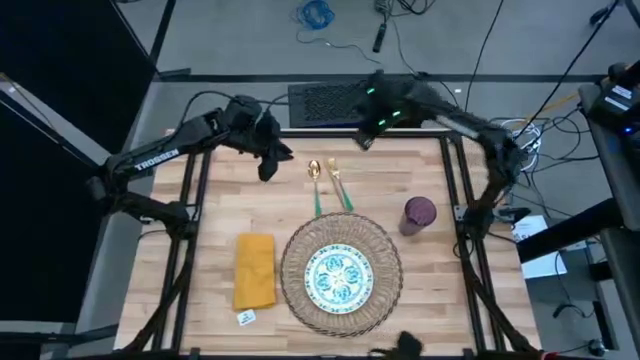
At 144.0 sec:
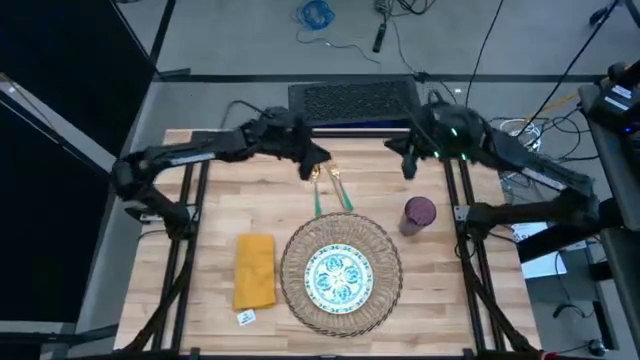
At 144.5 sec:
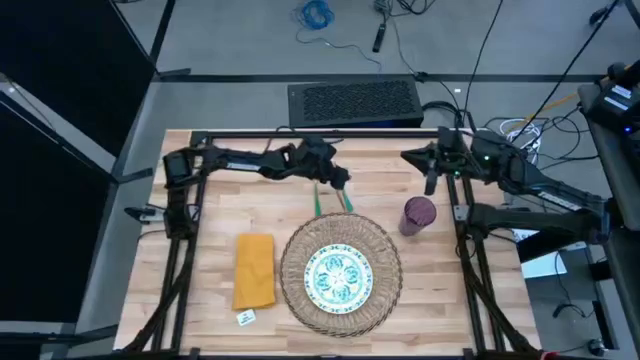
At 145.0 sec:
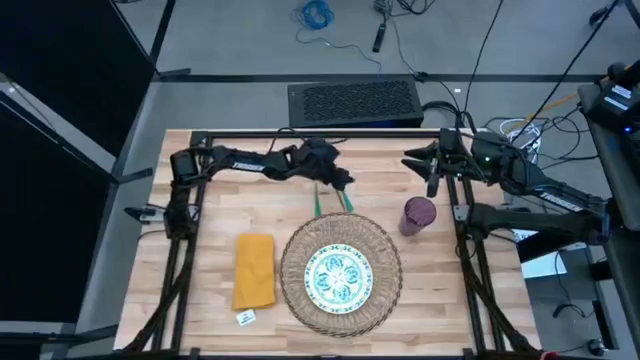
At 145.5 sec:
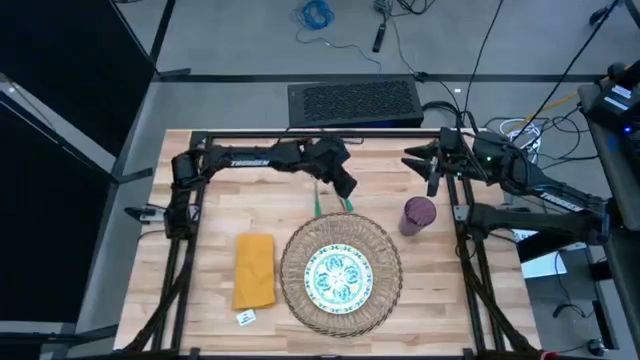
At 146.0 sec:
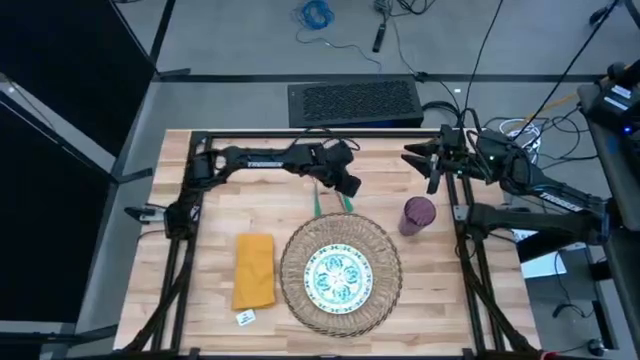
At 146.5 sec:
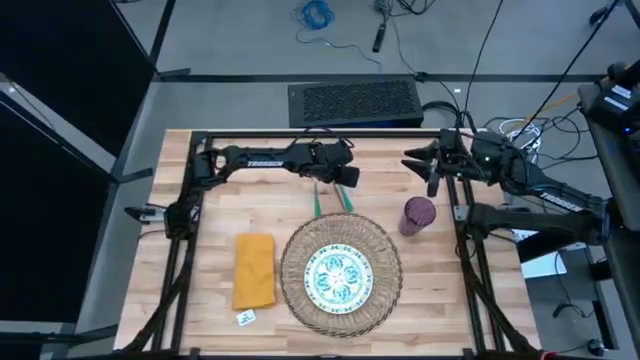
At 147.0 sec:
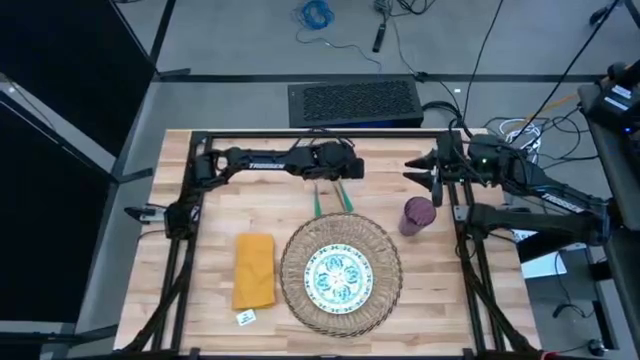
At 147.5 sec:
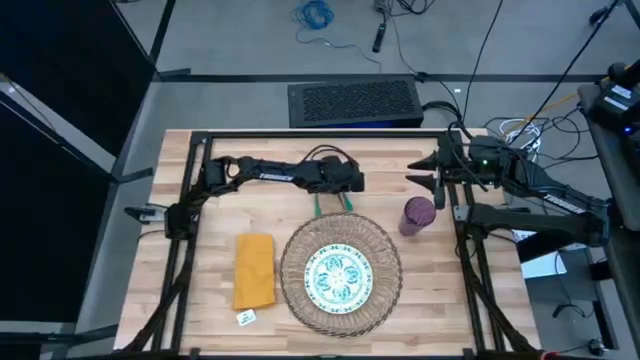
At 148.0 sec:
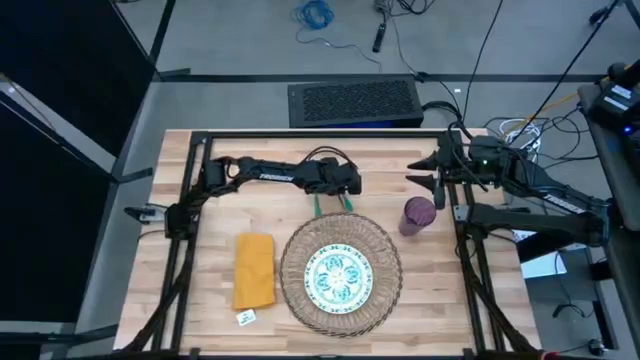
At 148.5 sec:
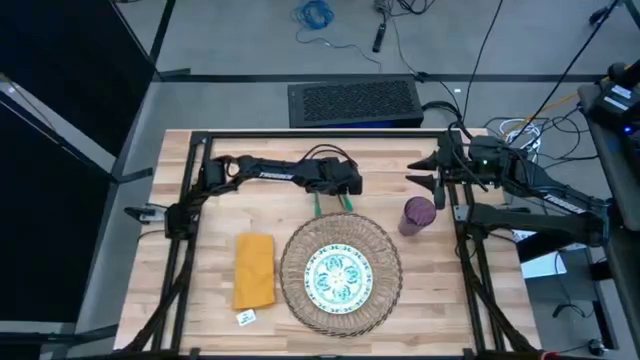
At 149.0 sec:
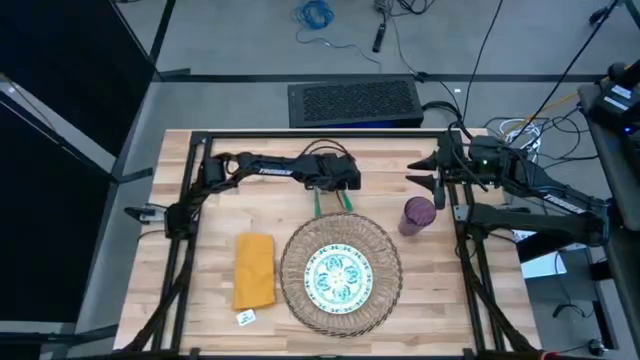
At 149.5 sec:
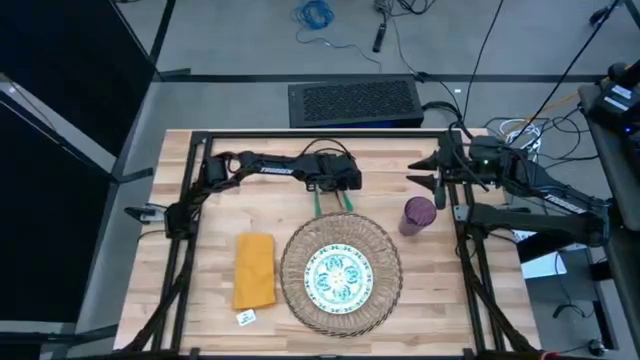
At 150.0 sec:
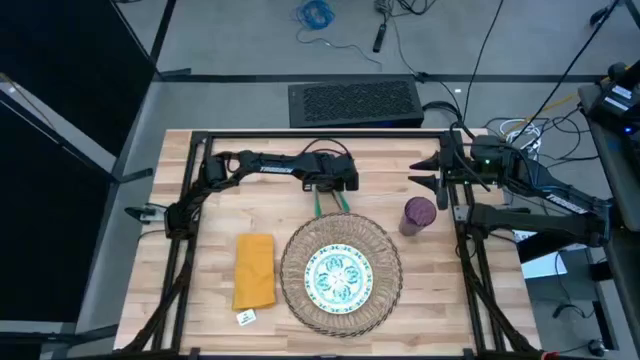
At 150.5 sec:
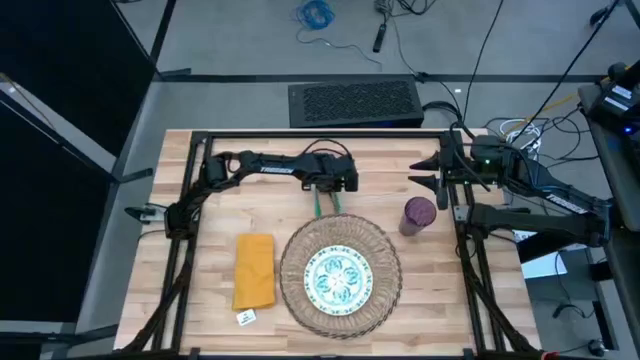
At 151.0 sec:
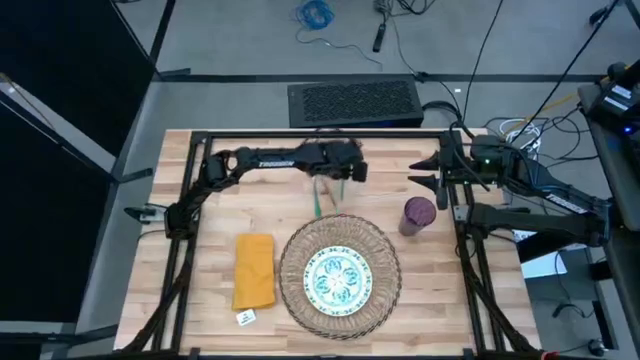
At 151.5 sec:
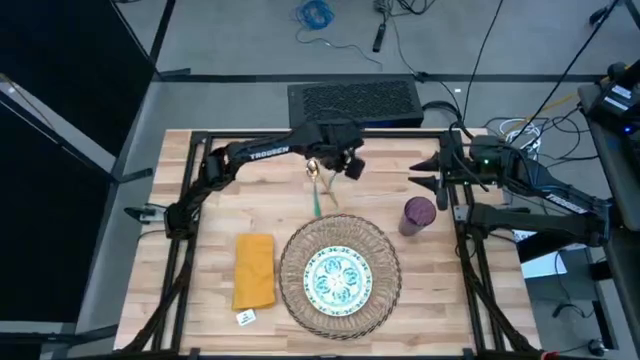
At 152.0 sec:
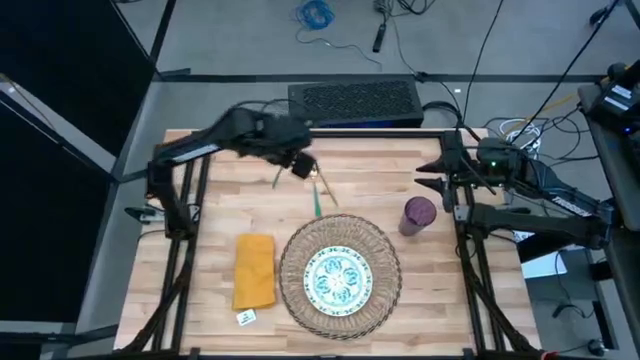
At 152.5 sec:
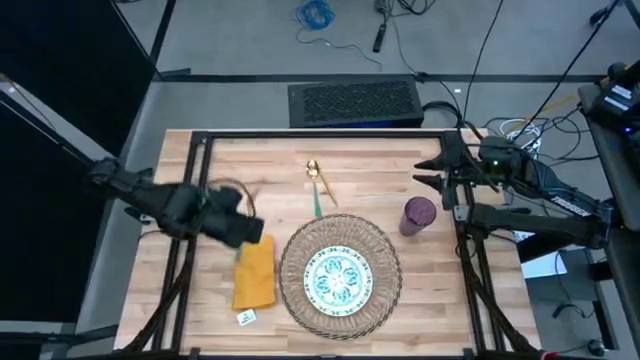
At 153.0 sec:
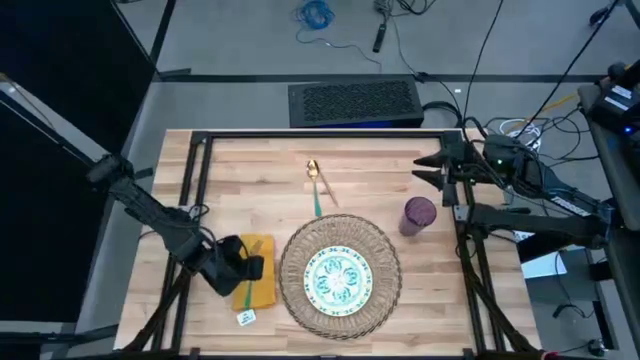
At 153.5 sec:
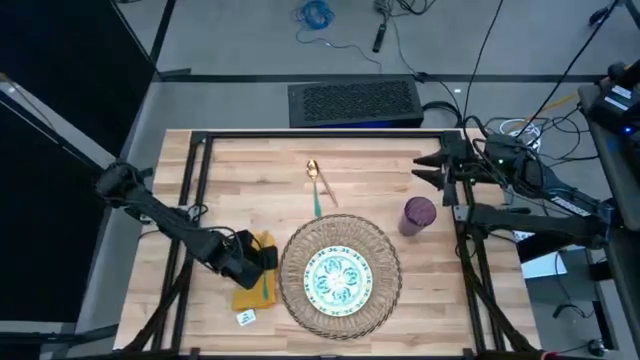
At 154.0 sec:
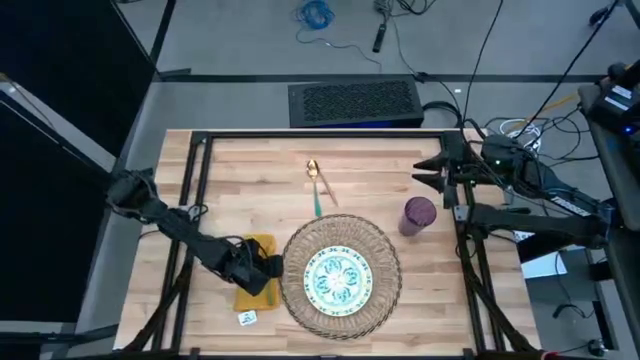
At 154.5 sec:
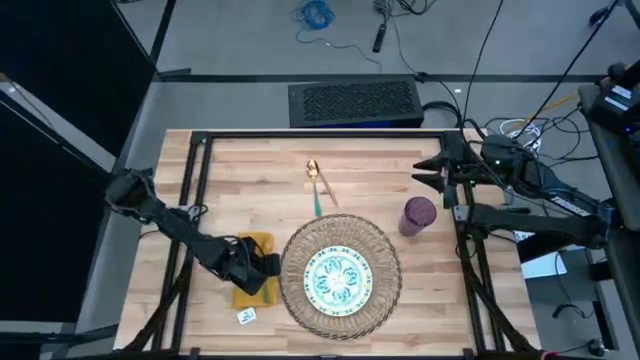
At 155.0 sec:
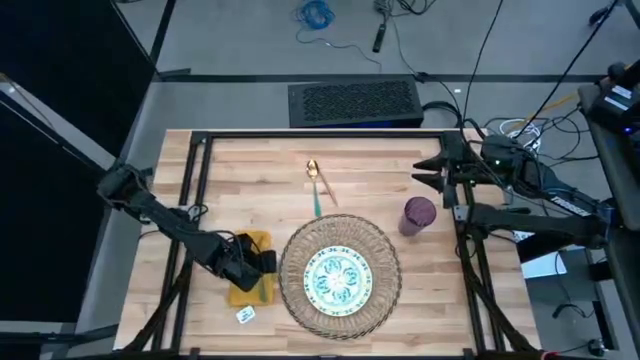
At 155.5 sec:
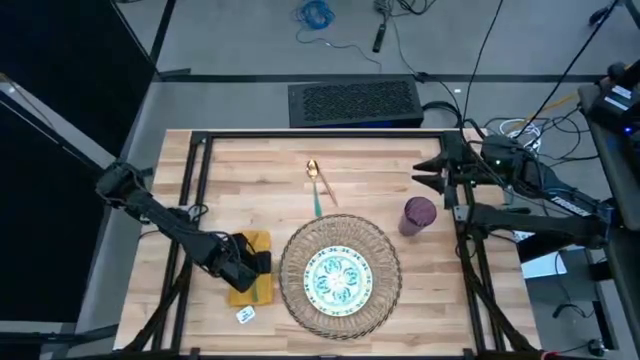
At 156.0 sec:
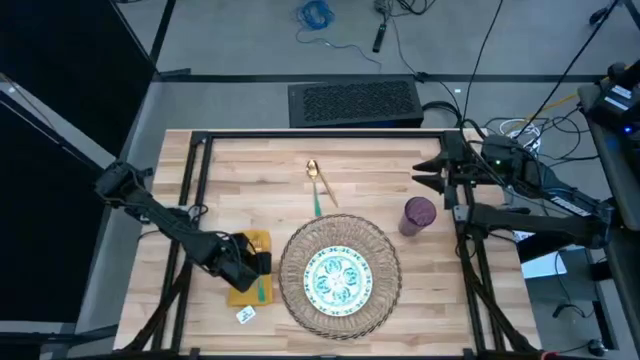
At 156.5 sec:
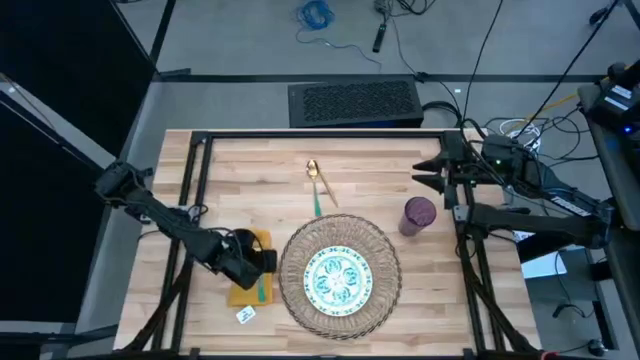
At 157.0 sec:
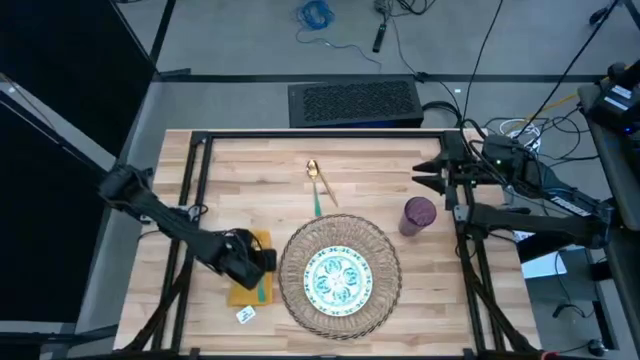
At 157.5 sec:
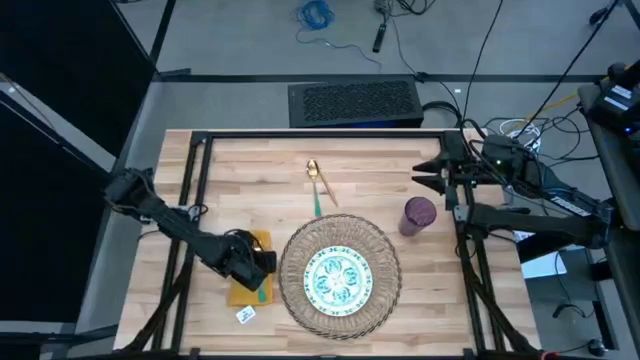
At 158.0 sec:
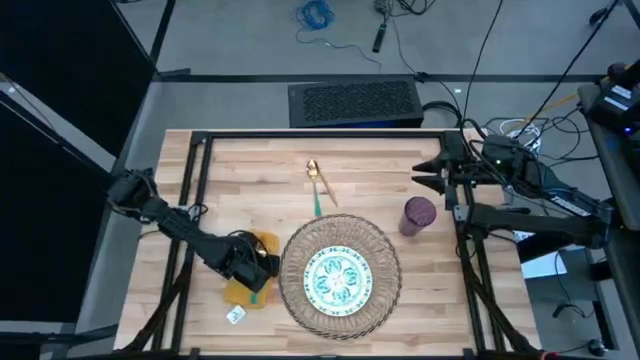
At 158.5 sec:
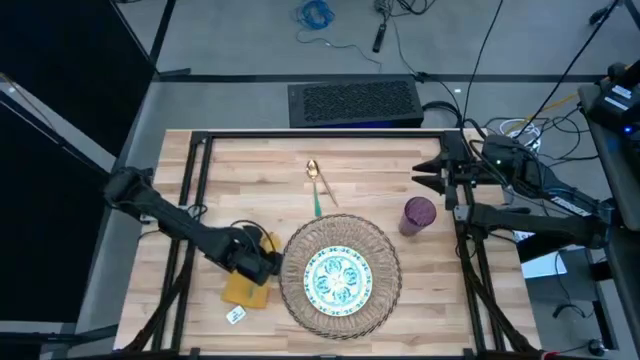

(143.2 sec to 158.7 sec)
Task: Set table place
Put the green table fork on top of the folded yellow table napkin
